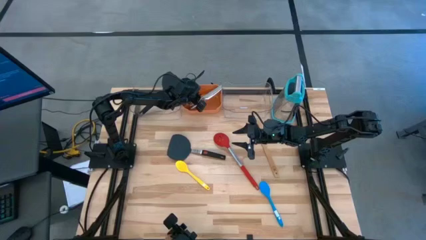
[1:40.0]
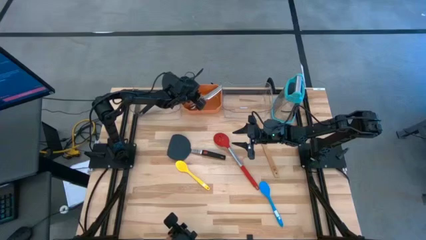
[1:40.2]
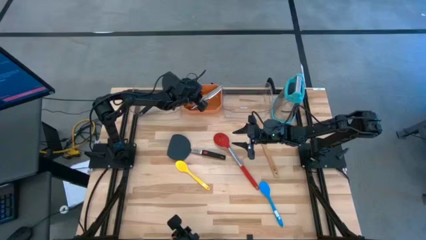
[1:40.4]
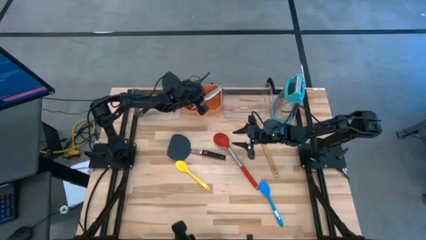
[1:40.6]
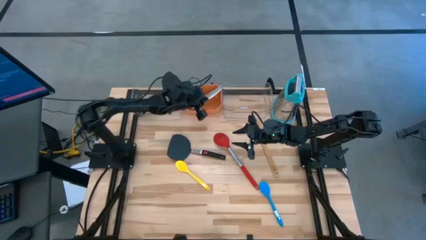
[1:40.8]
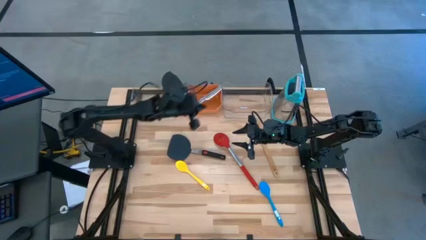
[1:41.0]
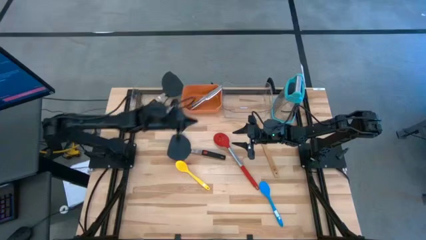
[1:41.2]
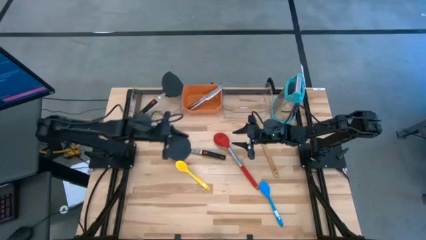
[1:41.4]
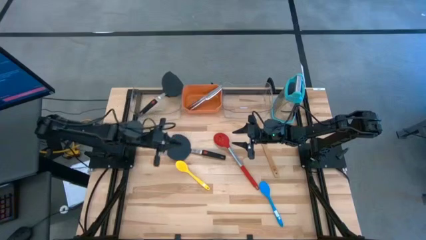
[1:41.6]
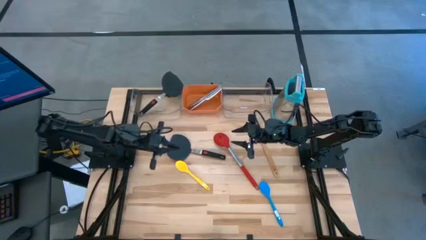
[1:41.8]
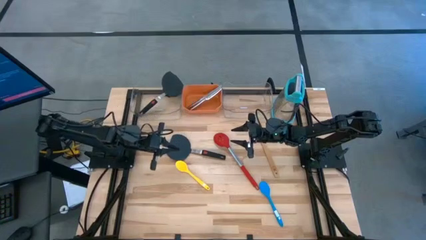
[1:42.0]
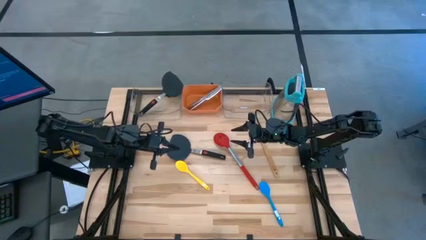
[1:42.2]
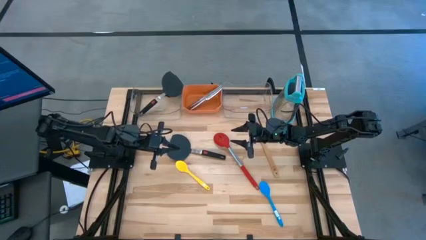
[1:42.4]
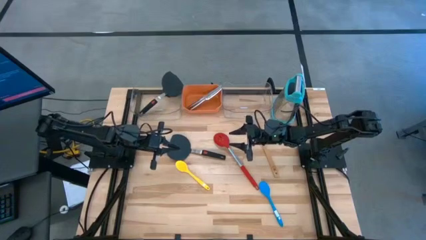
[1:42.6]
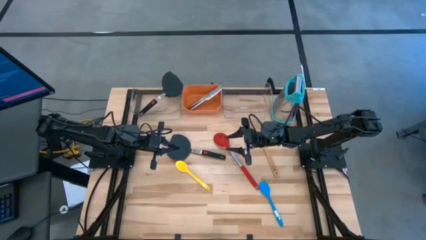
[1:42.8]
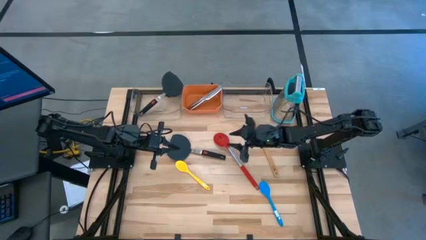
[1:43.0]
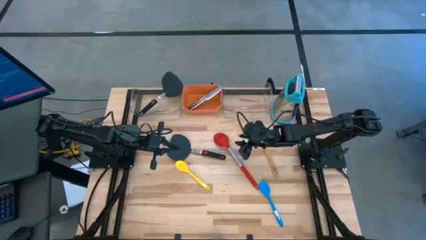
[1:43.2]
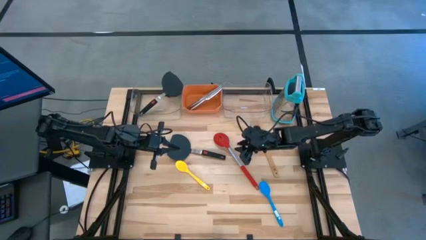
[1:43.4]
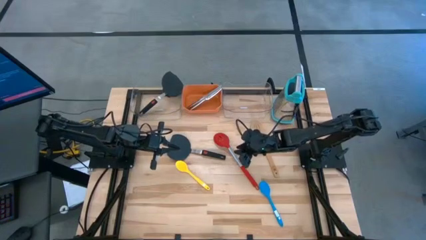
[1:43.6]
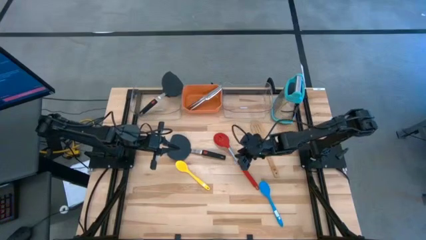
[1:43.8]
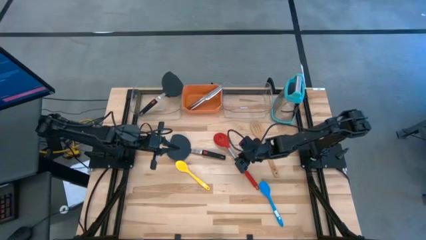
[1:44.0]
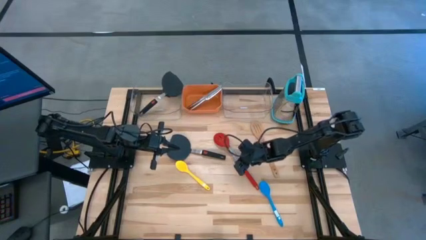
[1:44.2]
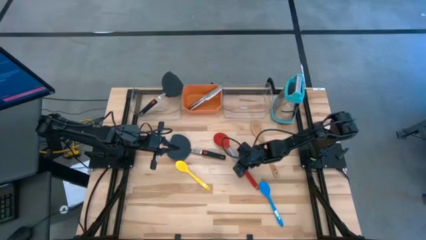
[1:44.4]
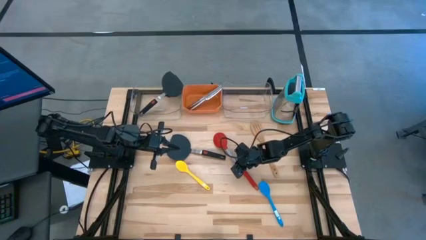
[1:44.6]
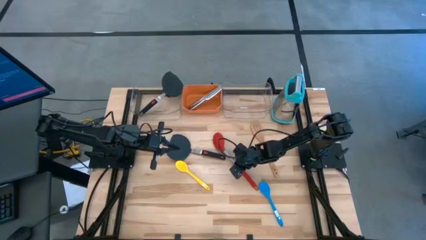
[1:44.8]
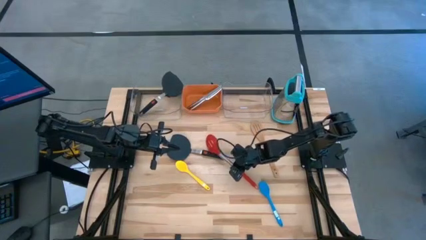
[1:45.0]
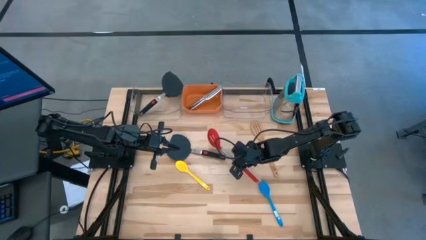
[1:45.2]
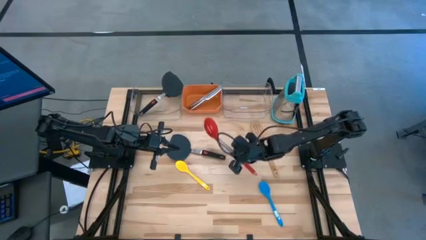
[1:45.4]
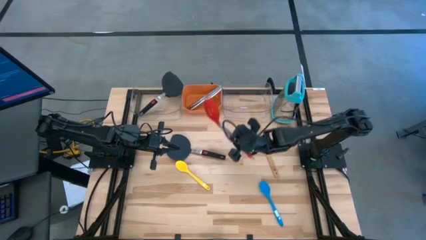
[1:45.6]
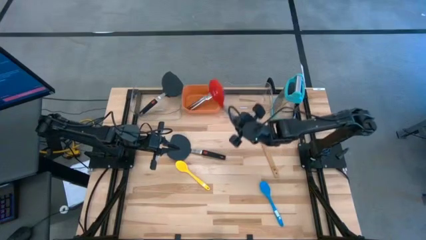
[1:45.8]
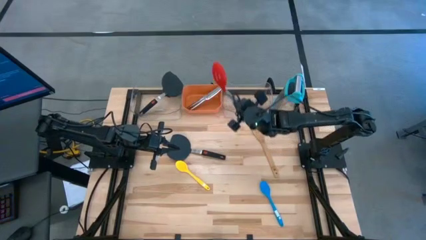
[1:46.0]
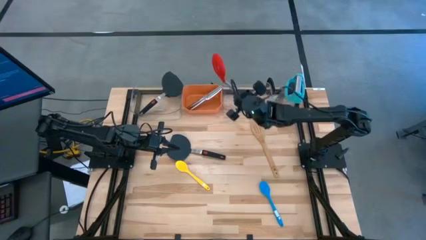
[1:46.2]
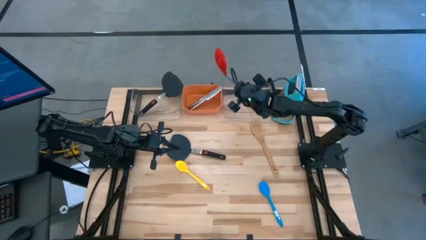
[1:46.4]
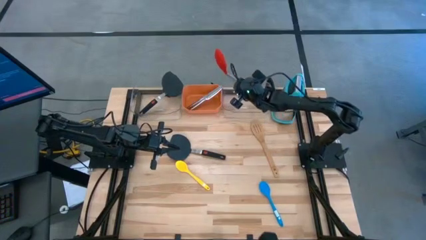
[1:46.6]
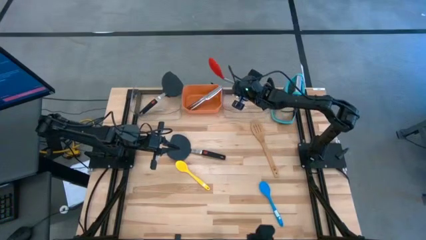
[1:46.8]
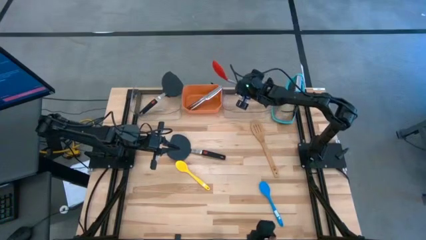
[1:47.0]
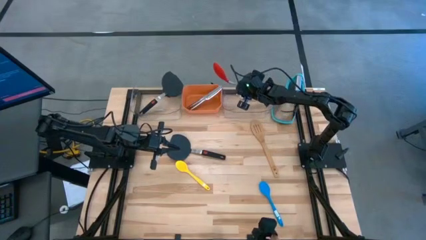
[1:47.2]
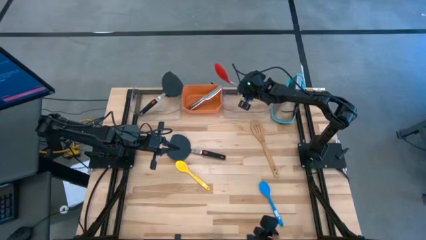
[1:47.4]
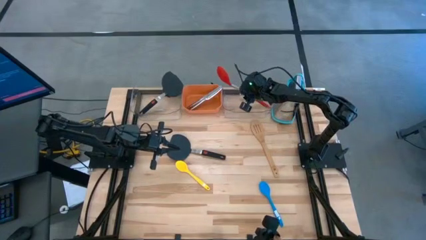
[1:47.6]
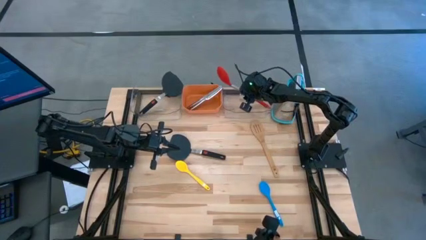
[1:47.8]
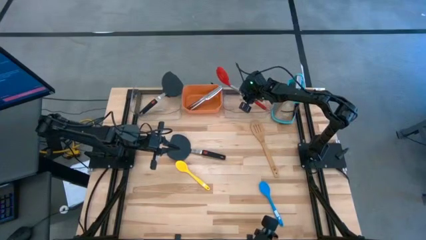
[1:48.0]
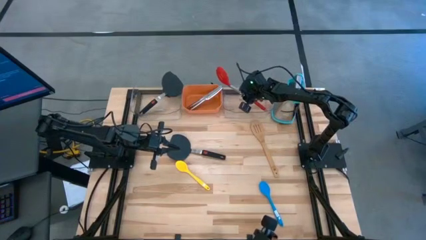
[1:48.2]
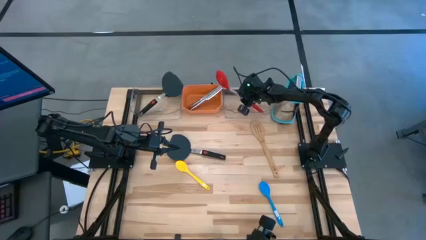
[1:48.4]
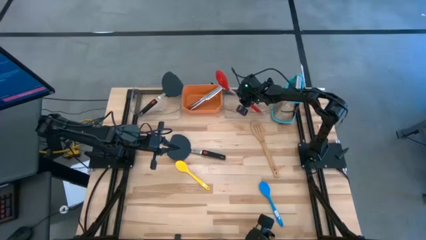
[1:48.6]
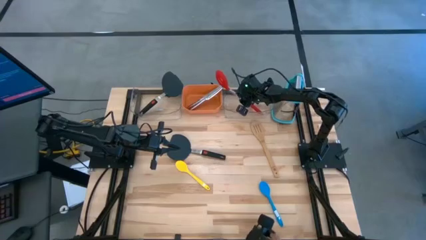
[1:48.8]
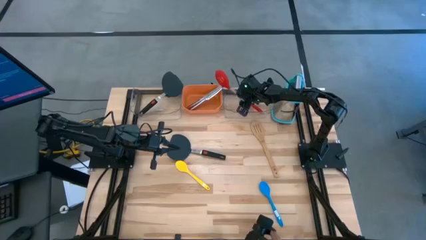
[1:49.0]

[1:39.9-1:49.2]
Task: Pick & Place Kitchen Items
Put the red serving spoon into the right transparent bin

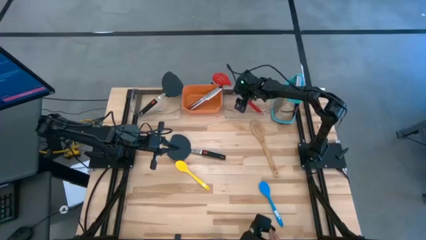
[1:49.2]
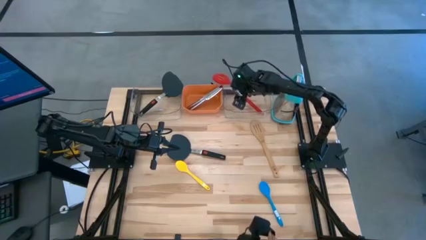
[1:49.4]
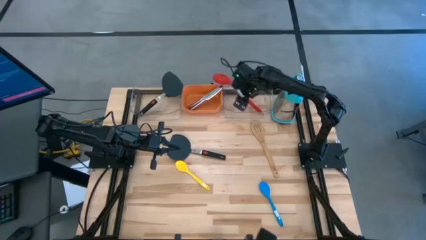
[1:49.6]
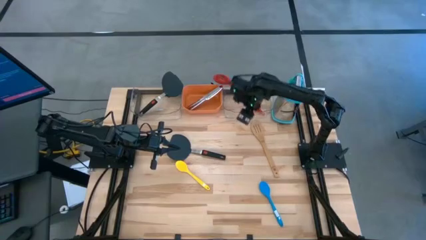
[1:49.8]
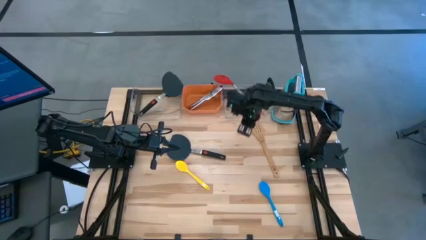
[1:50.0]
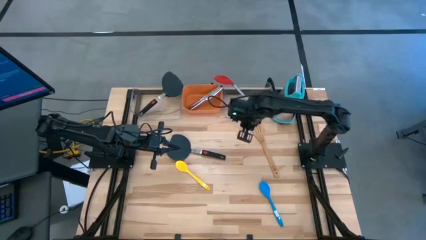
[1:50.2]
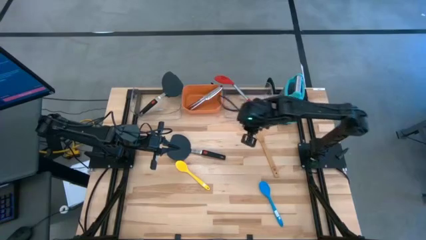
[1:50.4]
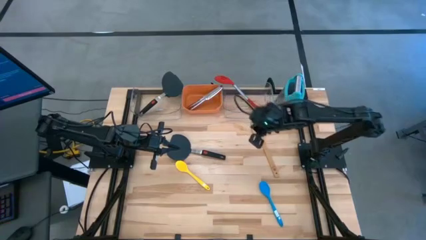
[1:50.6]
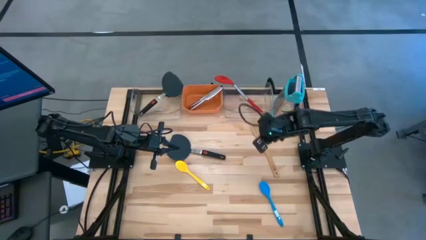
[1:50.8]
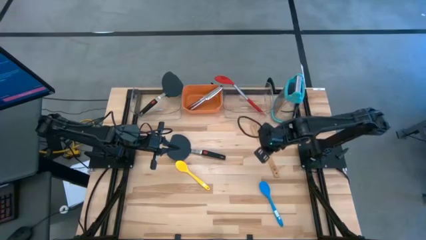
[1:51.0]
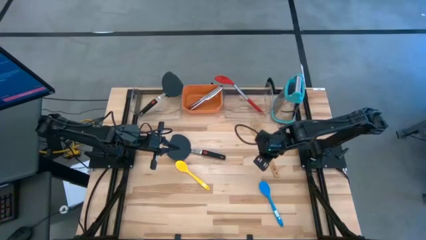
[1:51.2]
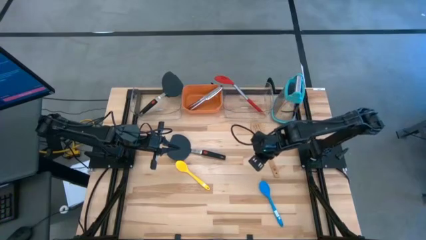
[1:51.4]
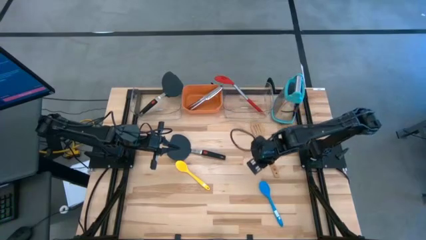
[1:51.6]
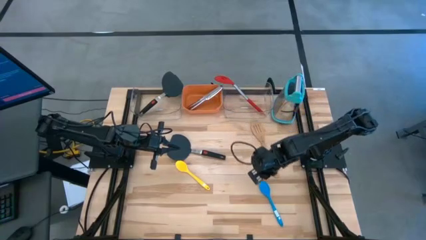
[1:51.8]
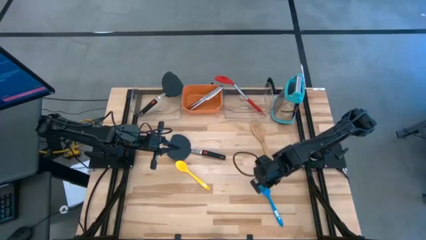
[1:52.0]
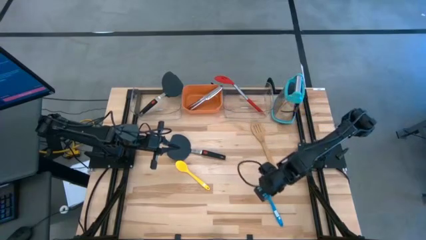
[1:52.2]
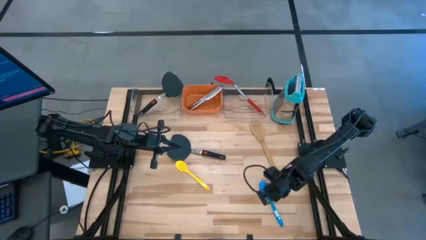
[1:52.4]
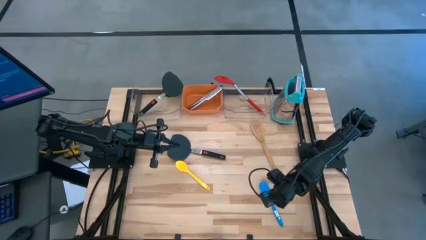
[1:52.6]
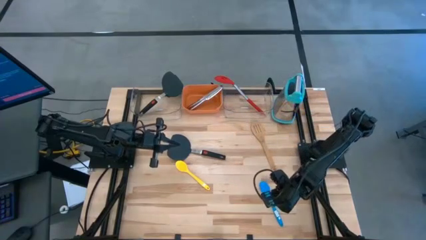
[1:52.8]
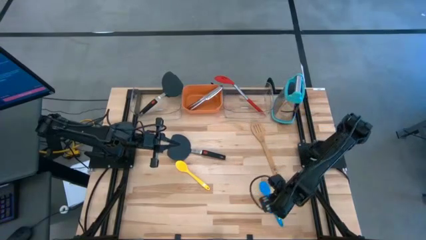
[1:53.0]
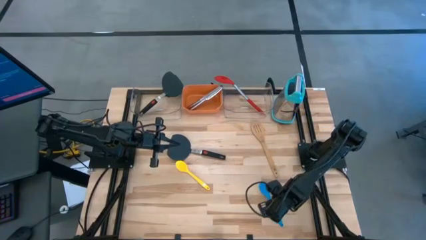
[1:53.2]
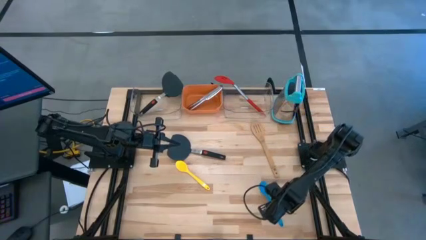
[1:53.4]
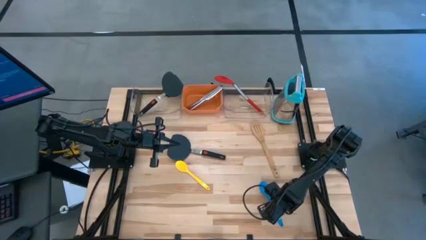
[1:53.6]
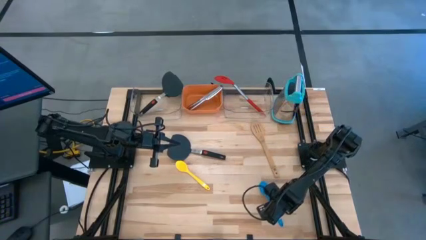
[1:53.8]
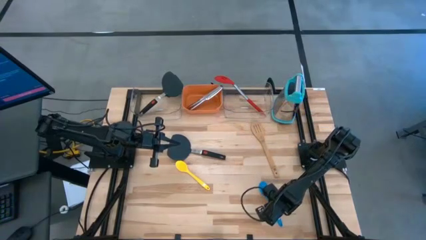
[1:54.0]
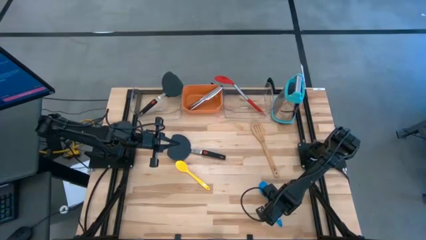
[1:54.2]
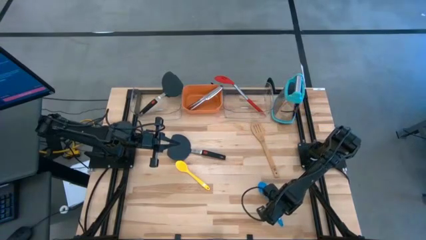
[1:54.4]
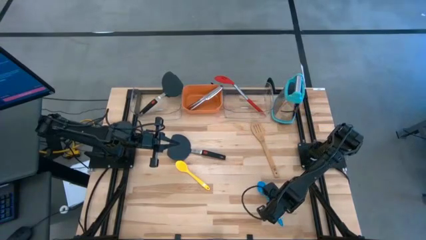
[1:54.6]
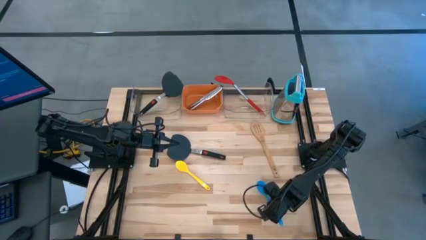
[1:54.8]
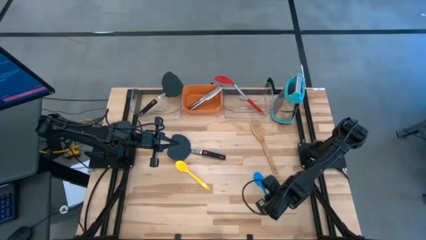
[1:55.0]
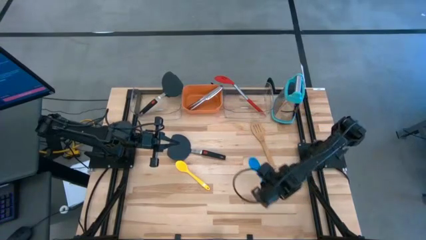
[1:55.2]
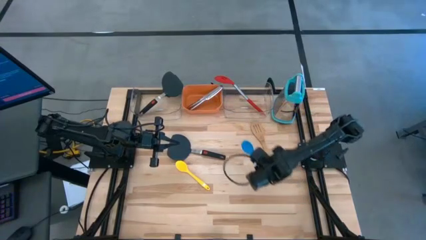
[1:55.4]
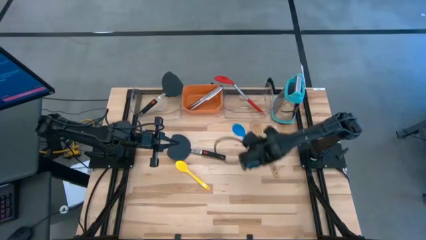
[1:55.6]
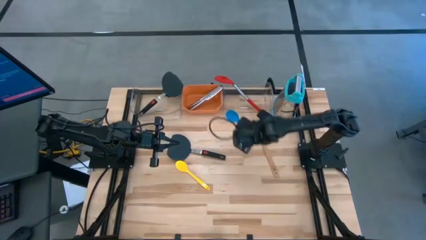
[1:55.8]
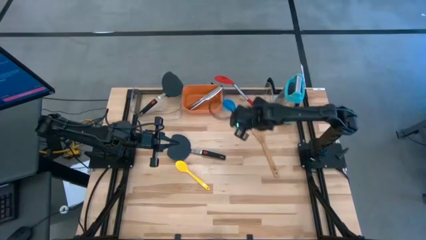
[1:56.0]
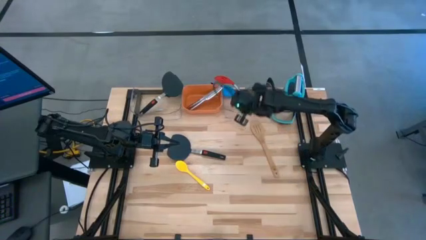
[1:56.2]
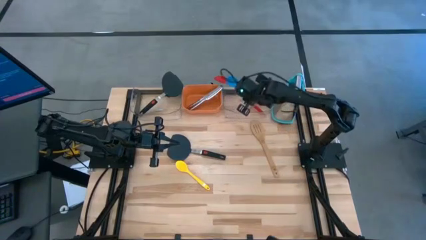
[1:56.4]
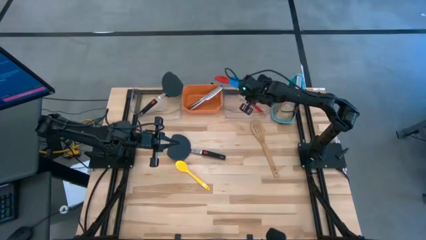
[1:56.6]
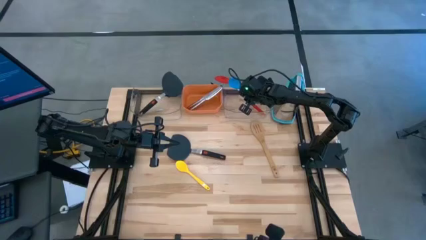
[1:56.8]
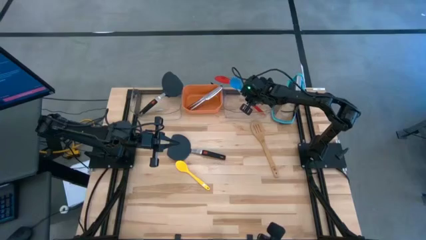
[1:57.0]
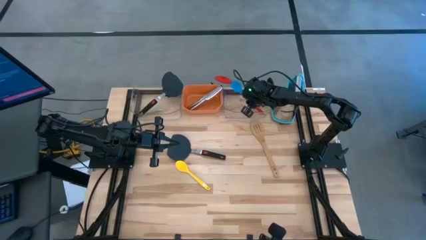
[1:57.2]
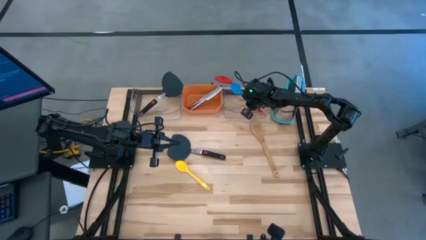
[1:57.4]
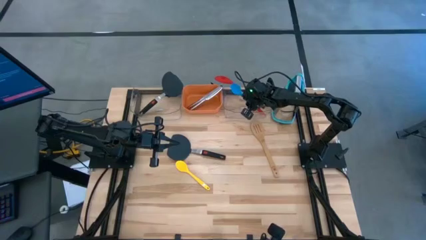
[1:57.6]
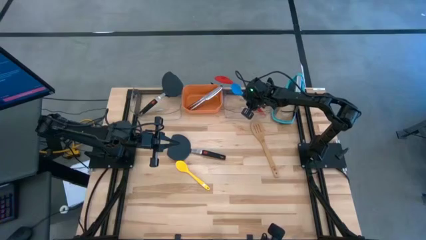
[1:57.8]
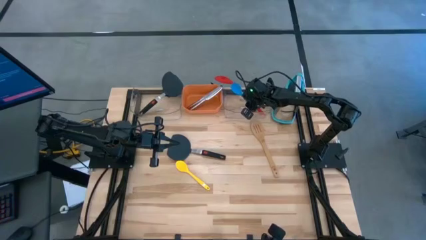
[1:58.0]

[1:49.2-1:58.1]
Put the blue serving spoon into the right transparent bin
